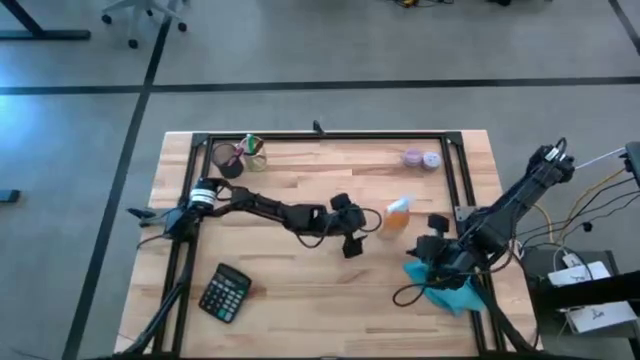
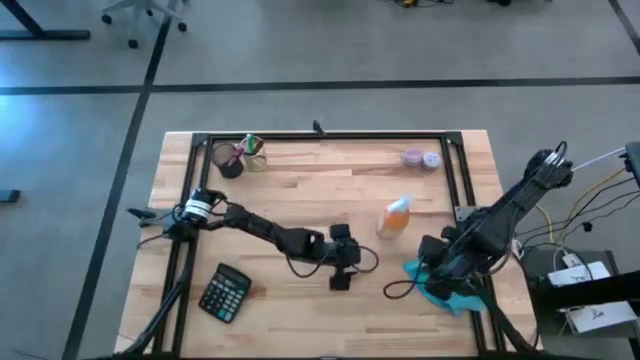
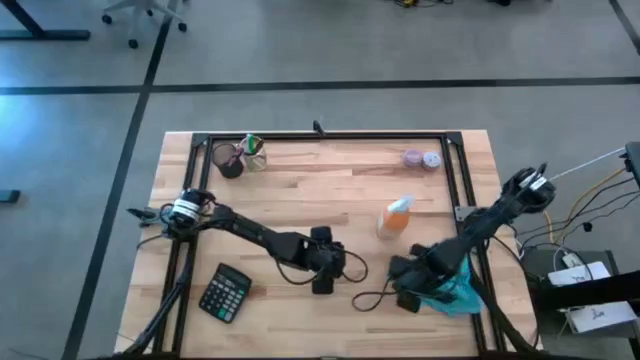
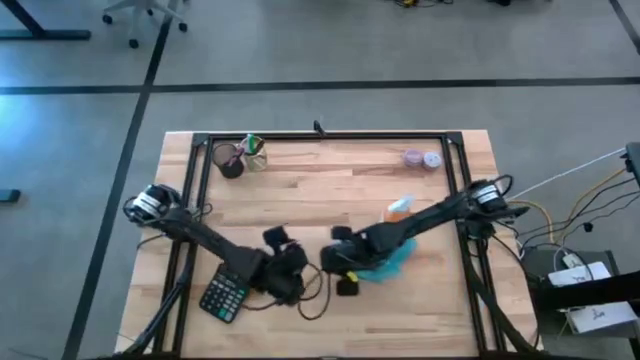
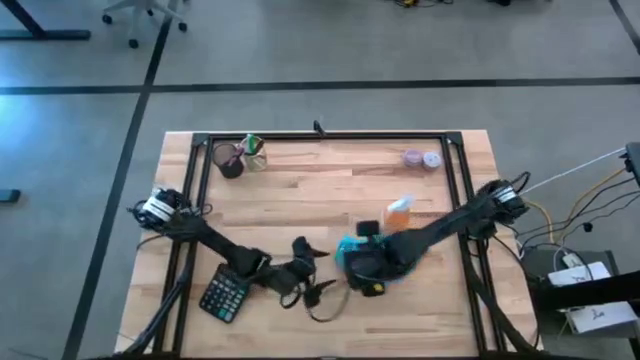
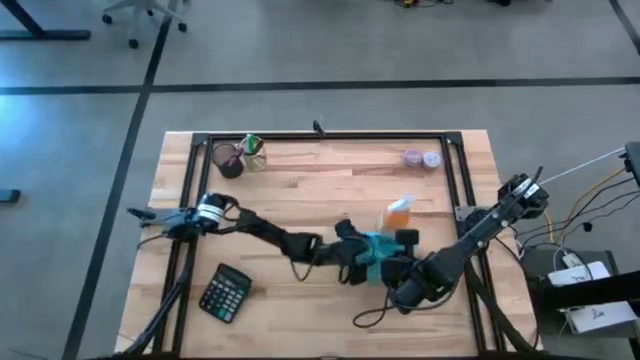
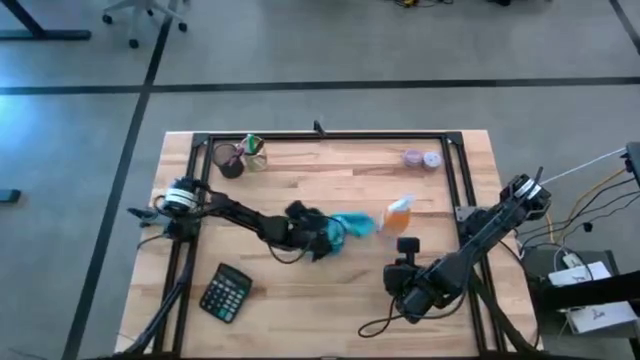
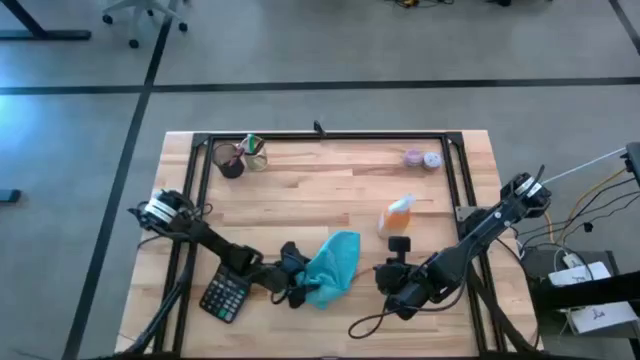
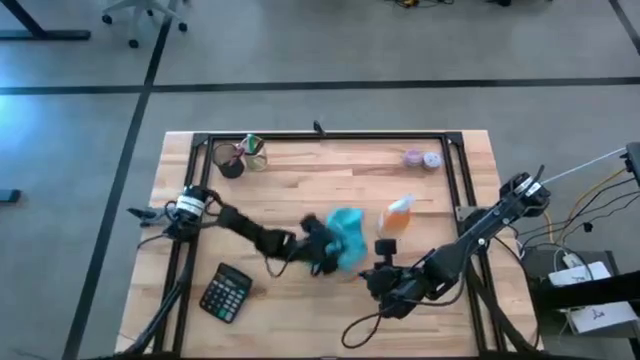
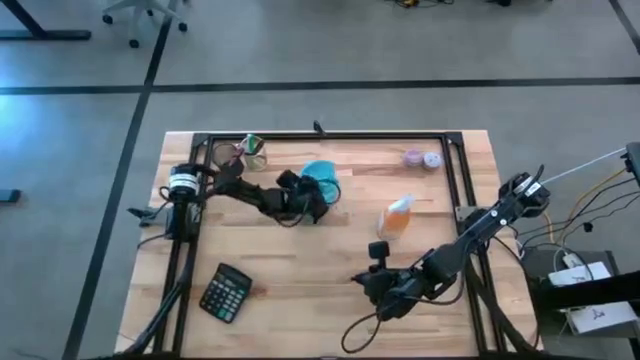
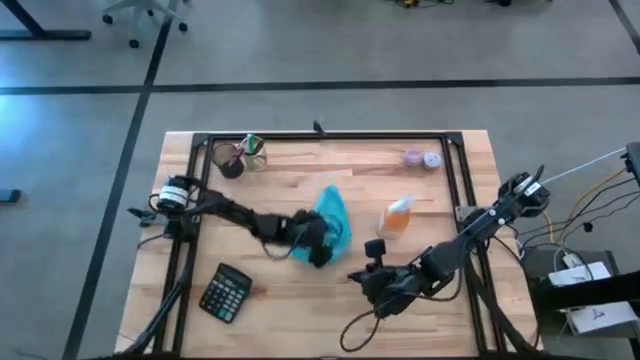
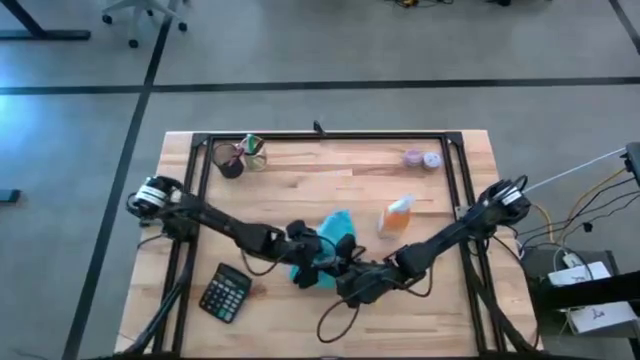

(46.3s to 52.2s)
Task: Apply microfiber cloth
Wipe the table using the blue microfiber cloth

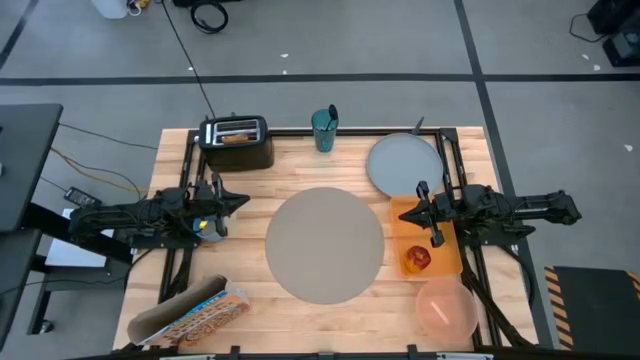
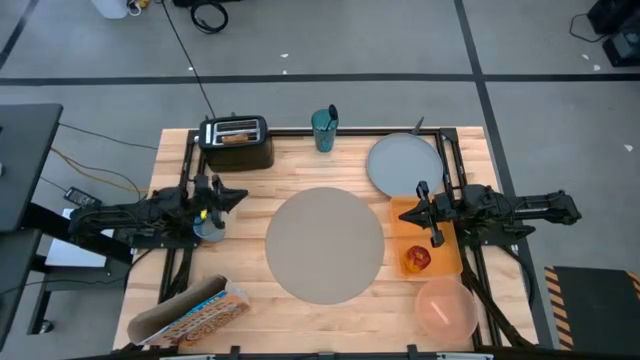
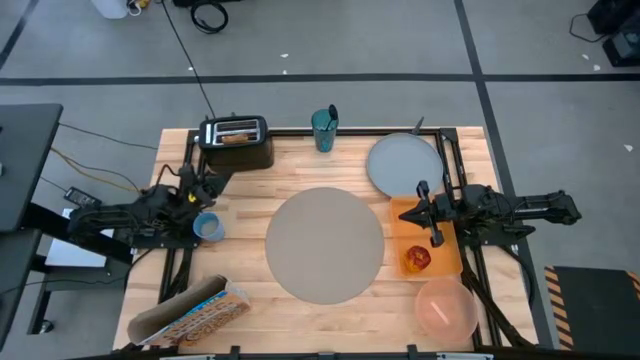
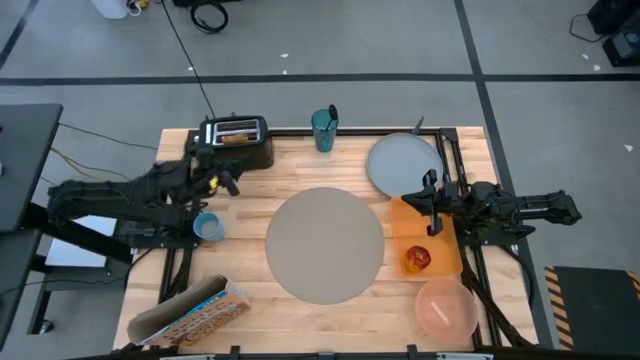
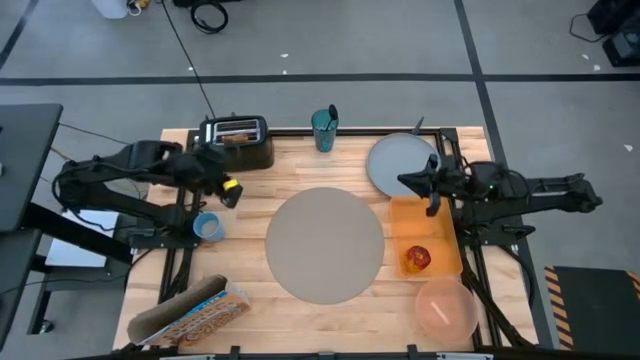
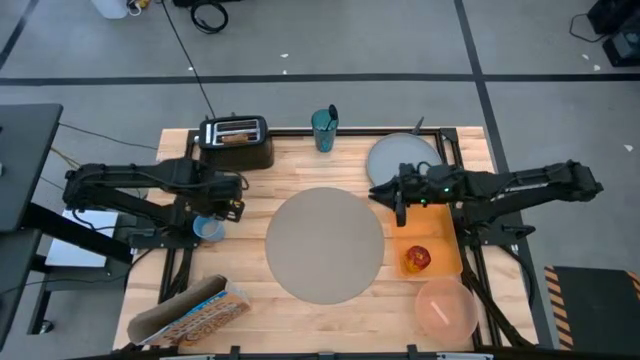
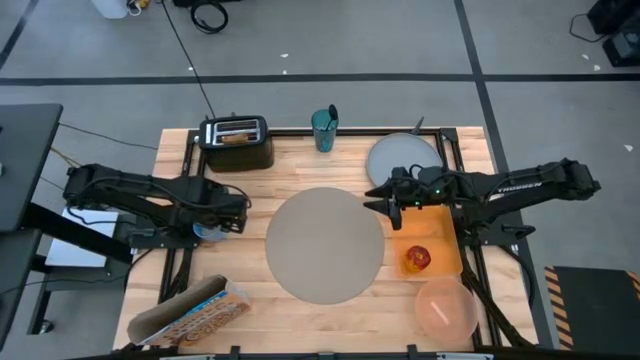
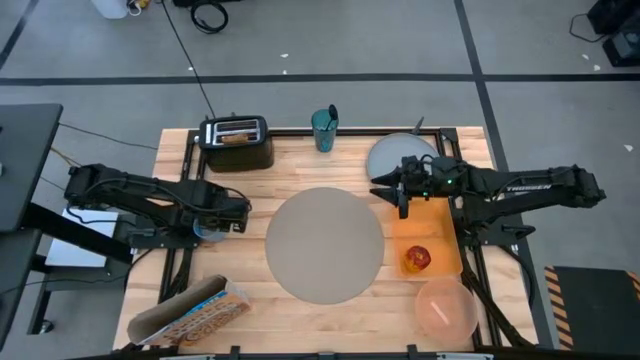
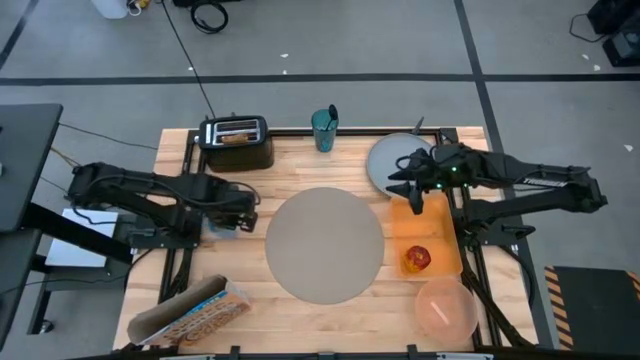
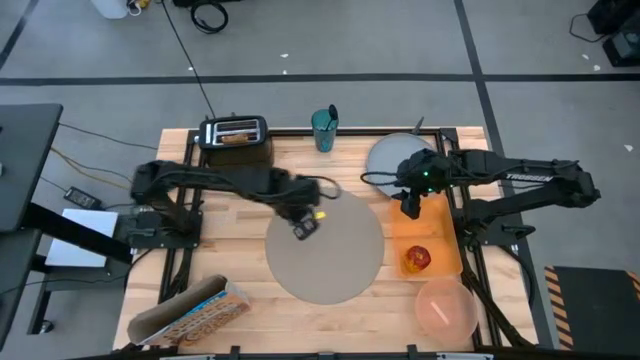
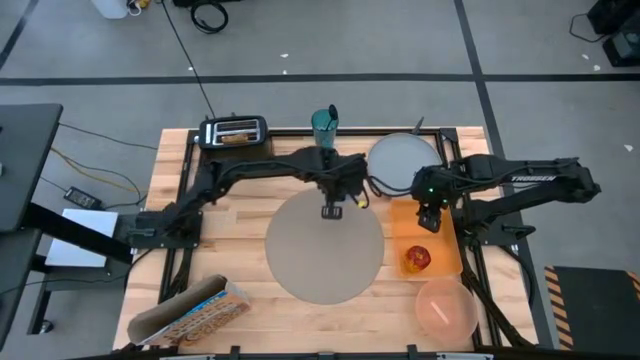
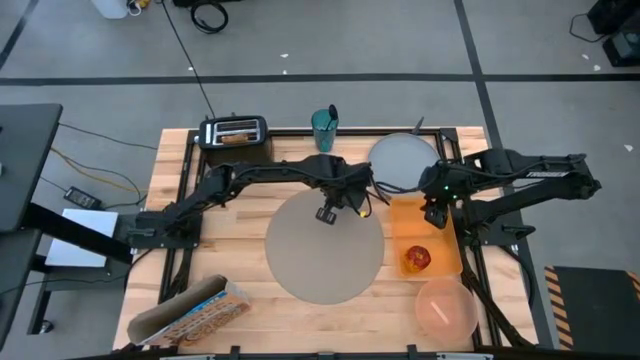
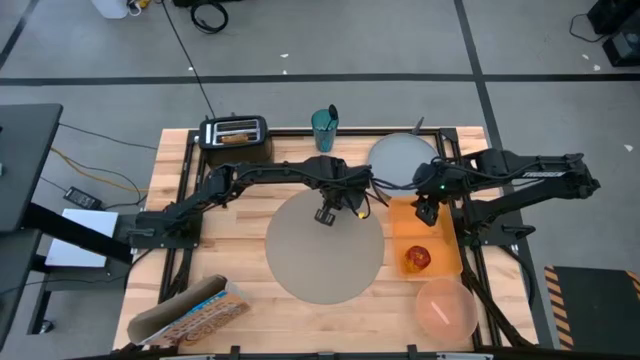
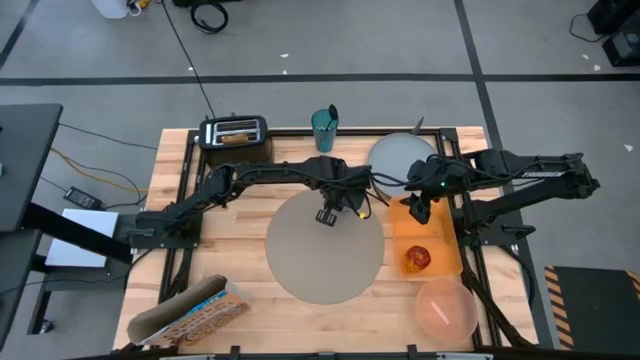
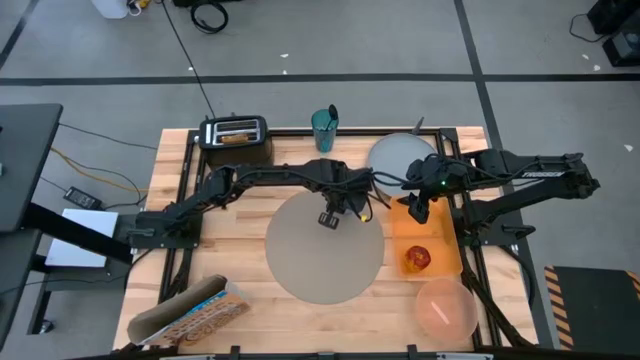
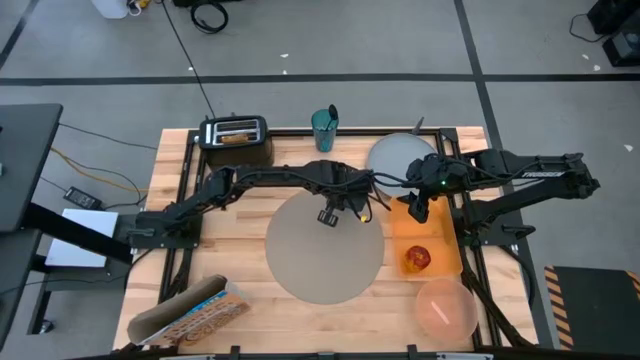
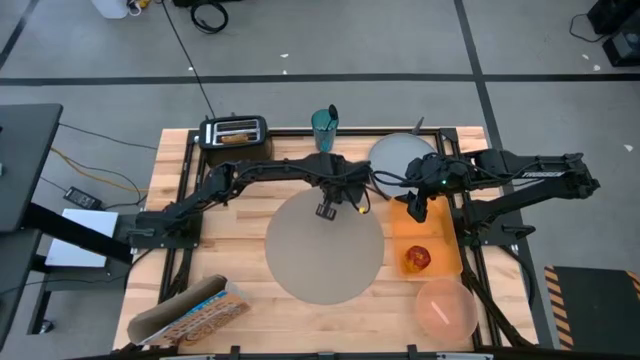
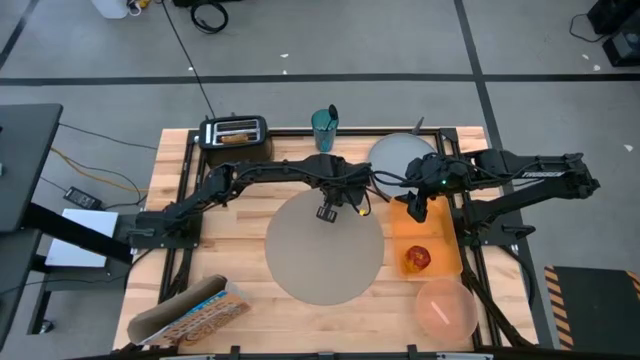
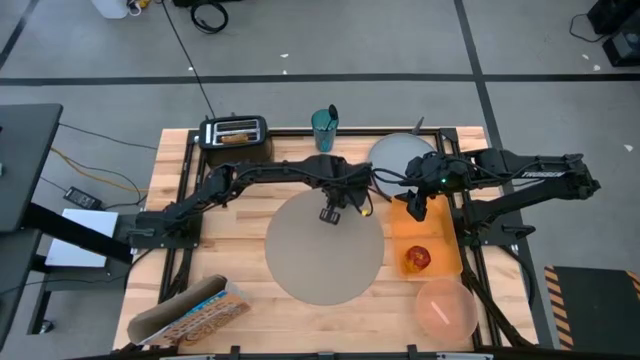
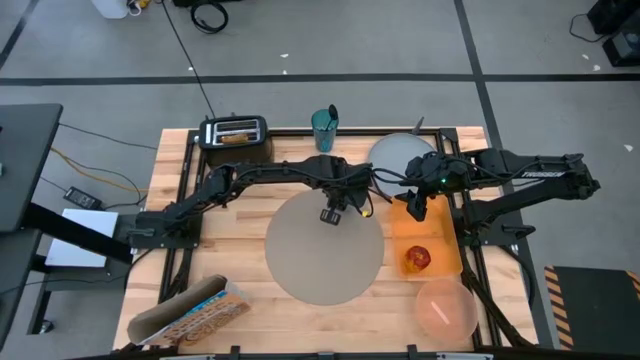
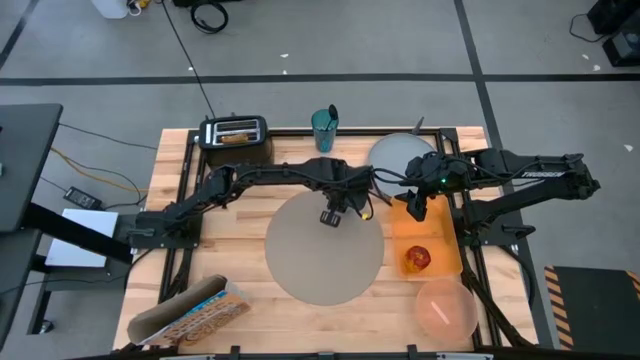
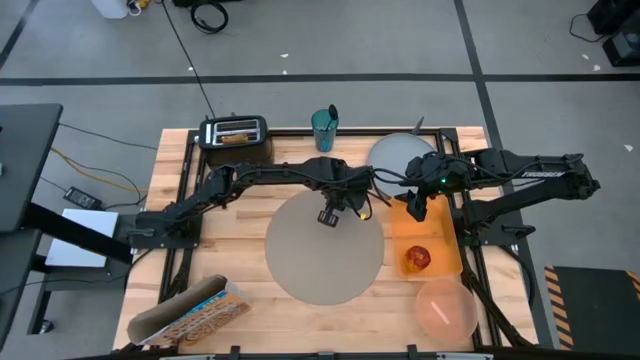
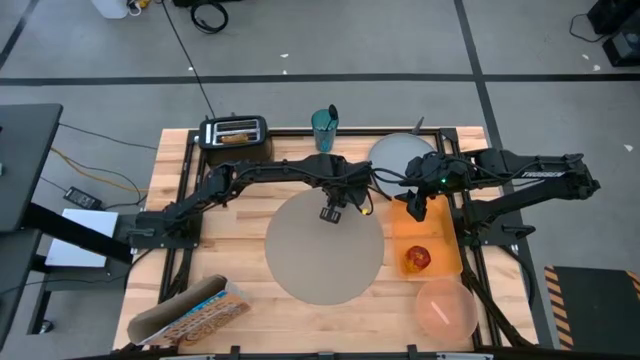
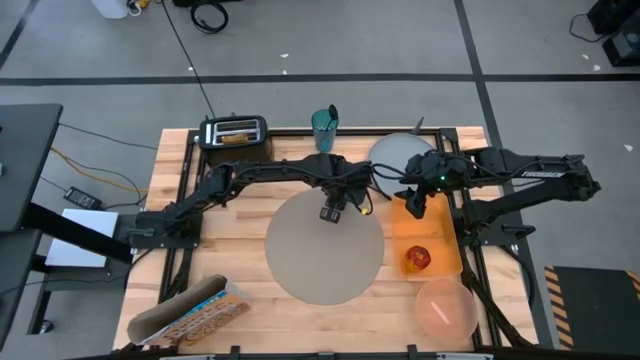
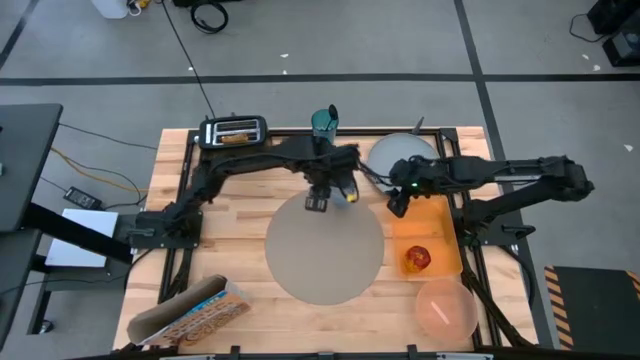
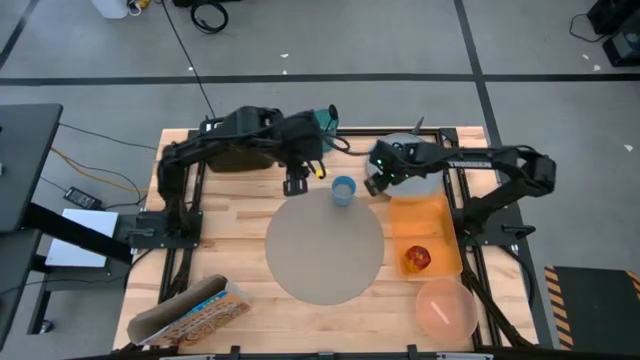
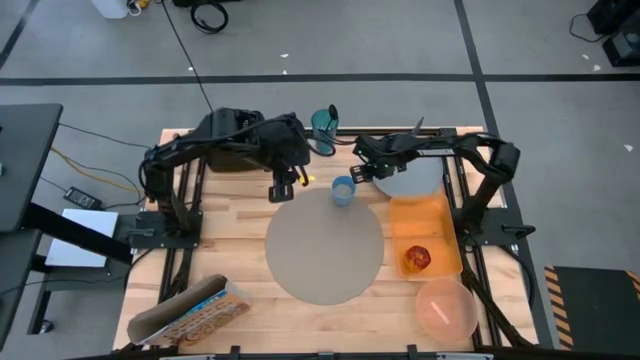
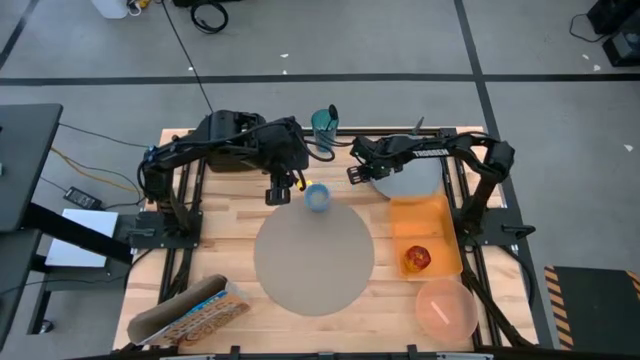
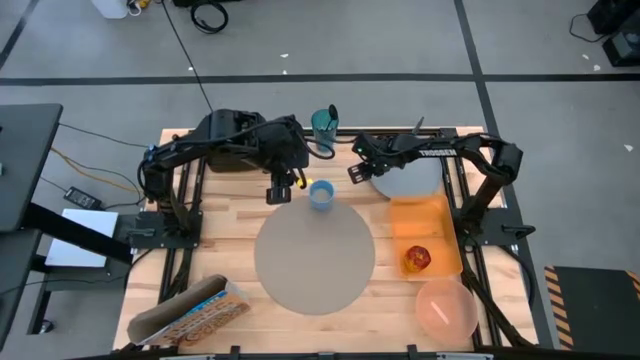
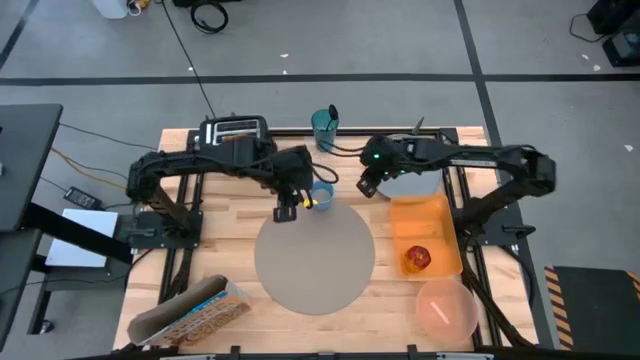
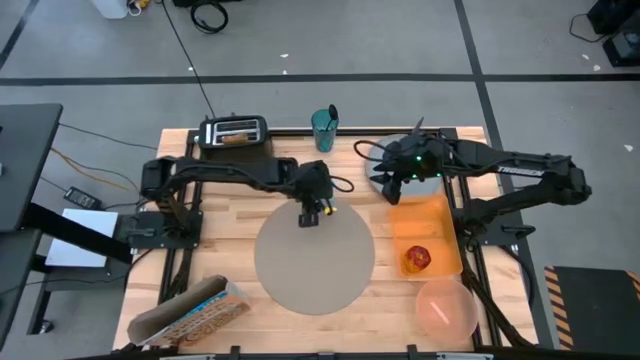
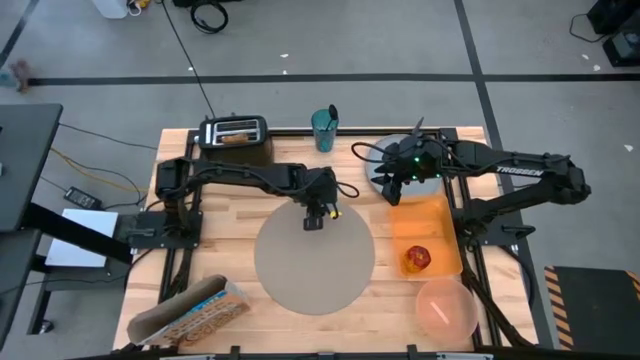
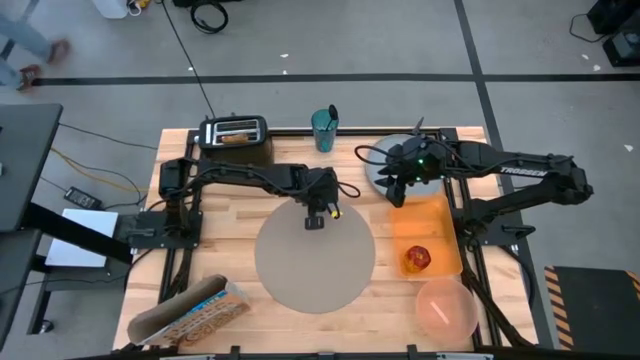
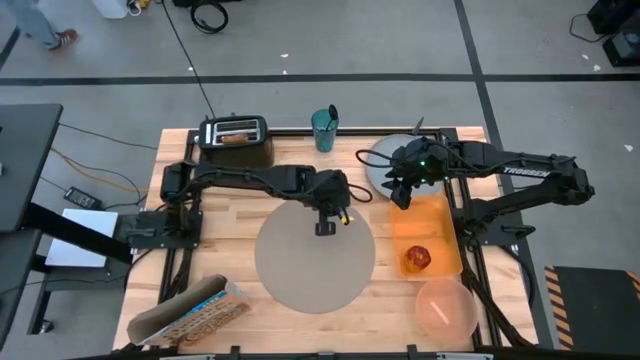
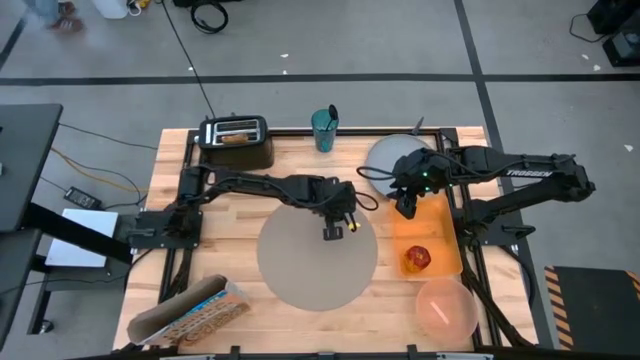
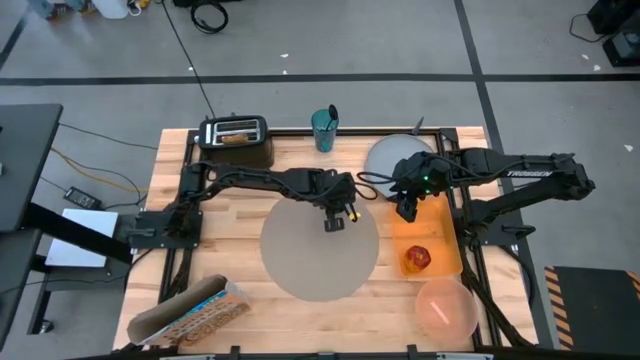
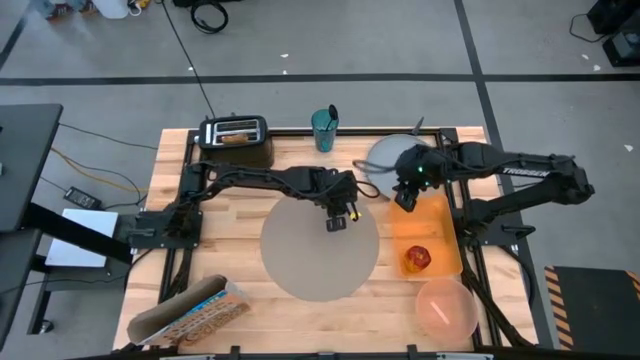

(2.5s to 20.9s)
Task: Arrange a breakfast setting
Put the light blue cup on the top right of the brown table mat
